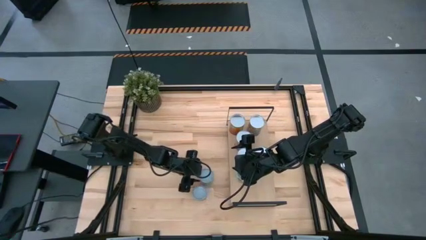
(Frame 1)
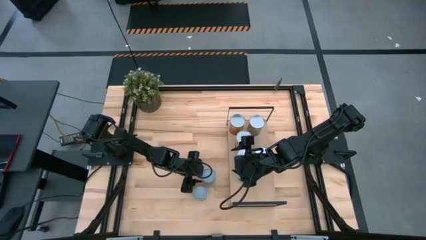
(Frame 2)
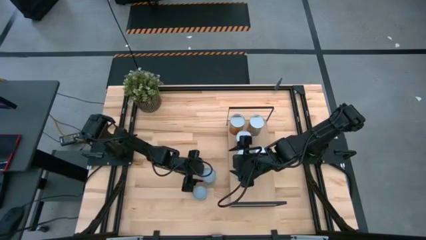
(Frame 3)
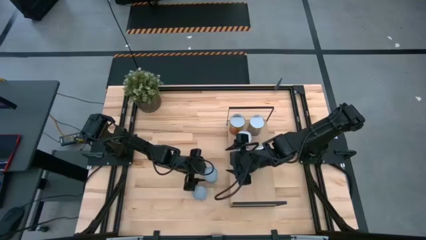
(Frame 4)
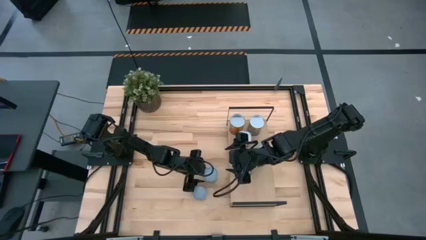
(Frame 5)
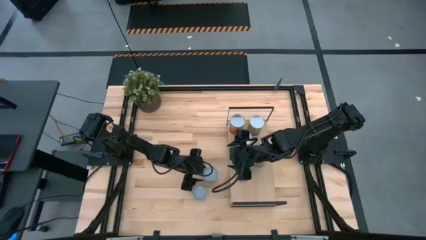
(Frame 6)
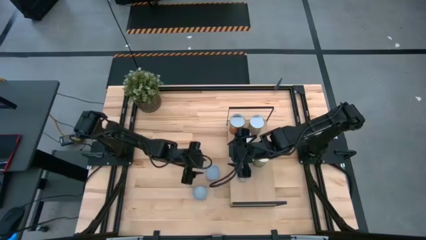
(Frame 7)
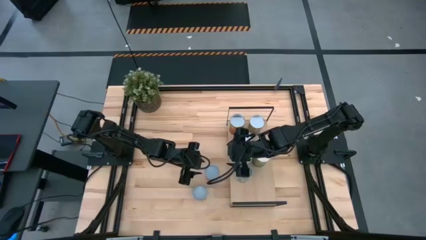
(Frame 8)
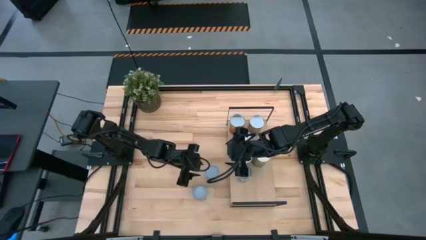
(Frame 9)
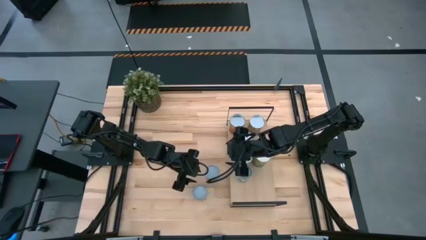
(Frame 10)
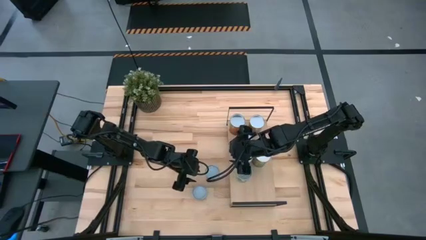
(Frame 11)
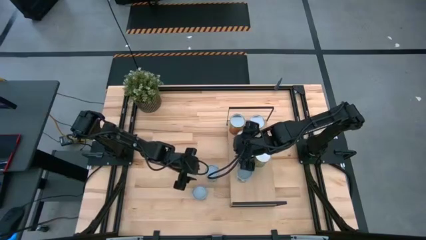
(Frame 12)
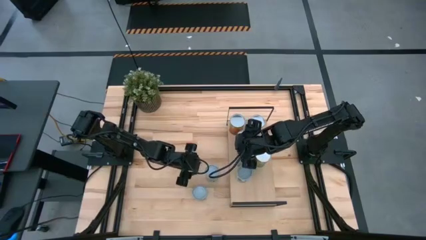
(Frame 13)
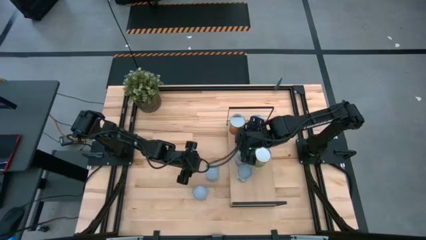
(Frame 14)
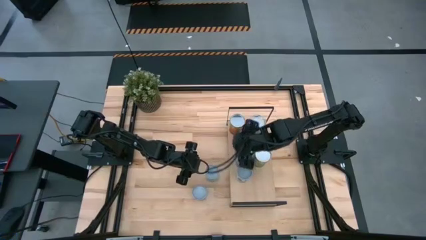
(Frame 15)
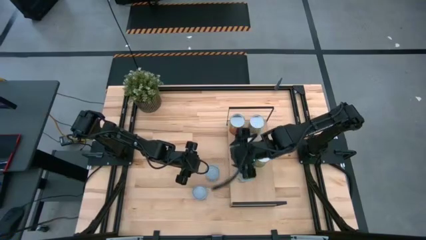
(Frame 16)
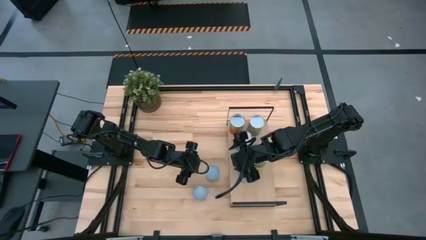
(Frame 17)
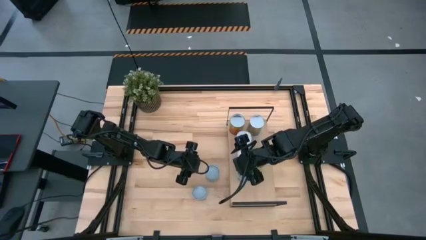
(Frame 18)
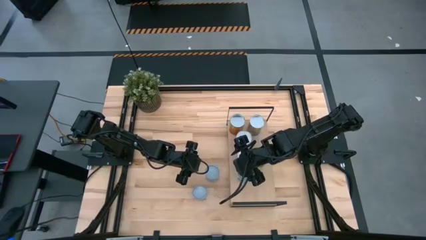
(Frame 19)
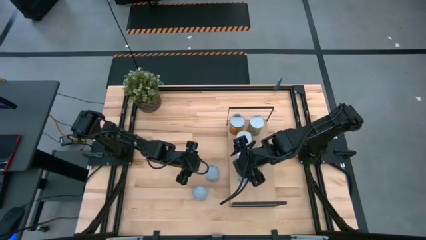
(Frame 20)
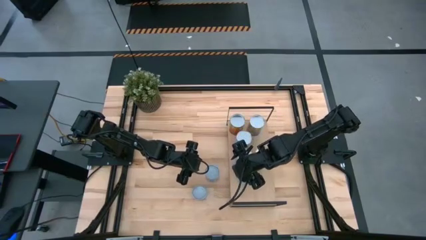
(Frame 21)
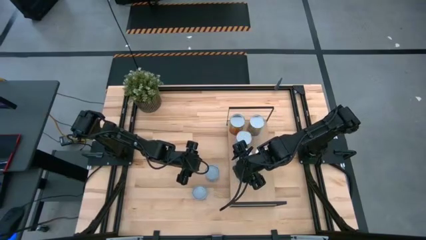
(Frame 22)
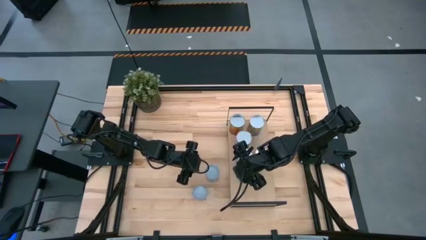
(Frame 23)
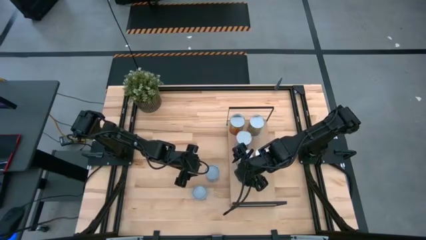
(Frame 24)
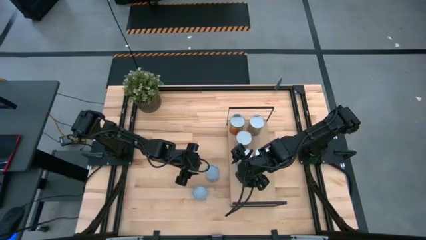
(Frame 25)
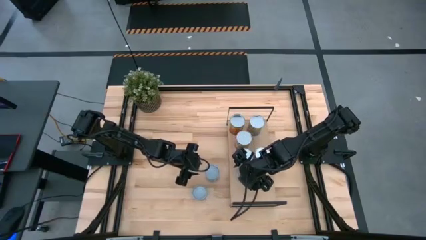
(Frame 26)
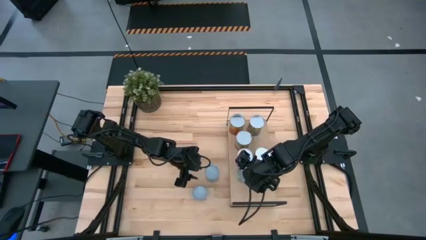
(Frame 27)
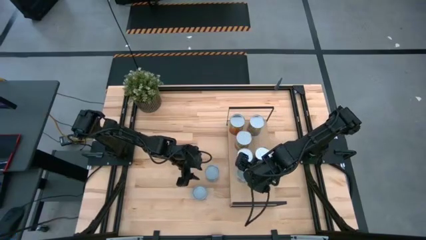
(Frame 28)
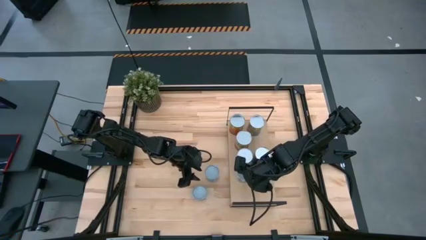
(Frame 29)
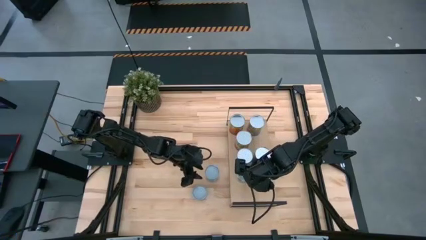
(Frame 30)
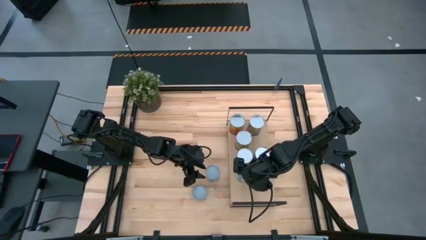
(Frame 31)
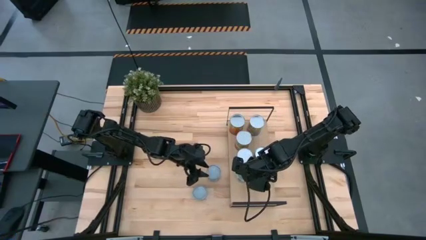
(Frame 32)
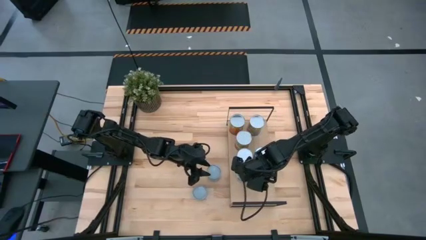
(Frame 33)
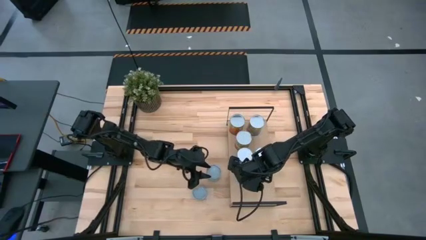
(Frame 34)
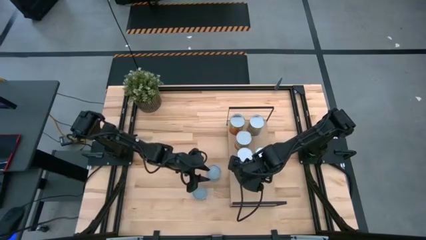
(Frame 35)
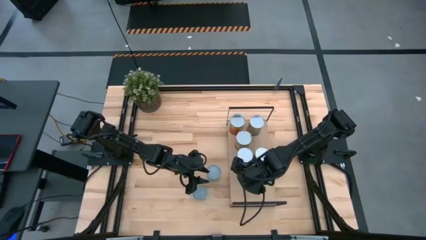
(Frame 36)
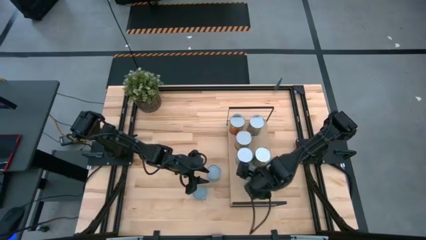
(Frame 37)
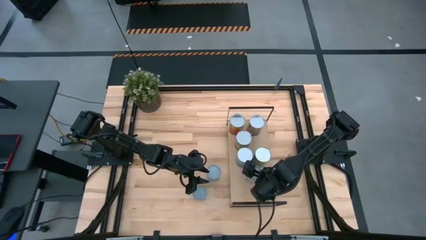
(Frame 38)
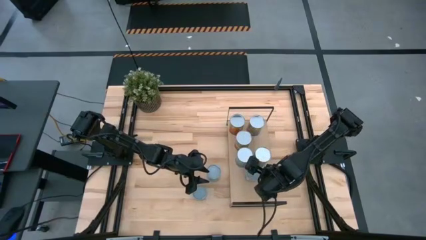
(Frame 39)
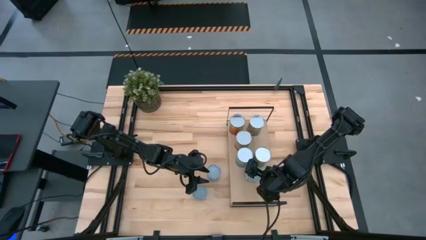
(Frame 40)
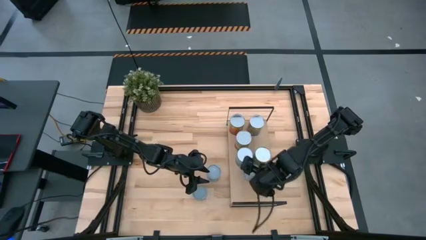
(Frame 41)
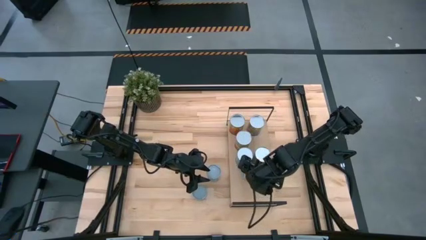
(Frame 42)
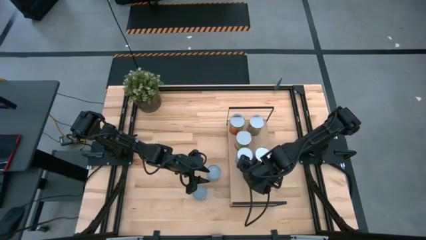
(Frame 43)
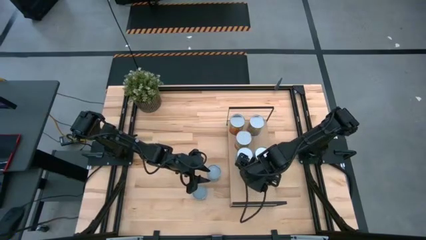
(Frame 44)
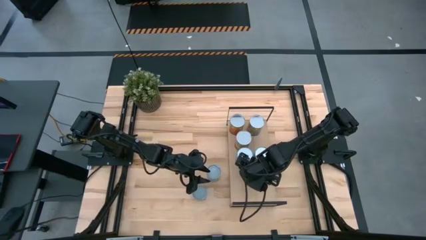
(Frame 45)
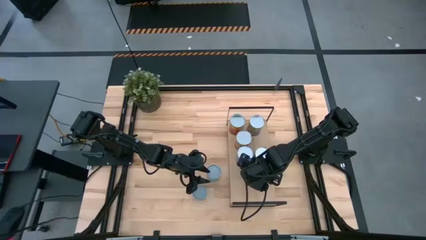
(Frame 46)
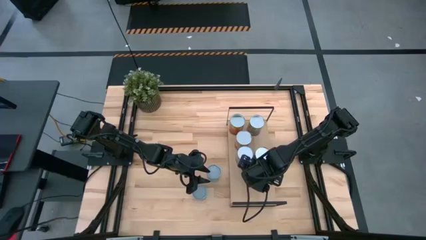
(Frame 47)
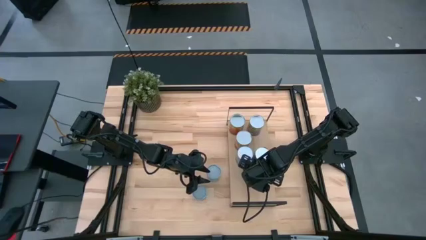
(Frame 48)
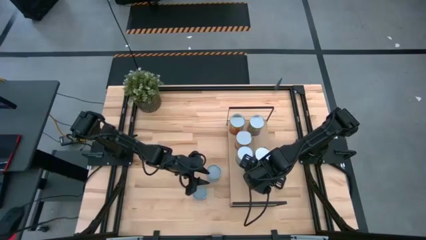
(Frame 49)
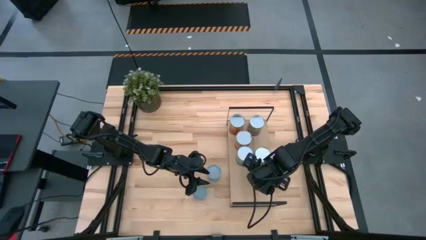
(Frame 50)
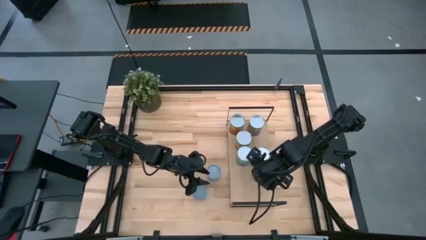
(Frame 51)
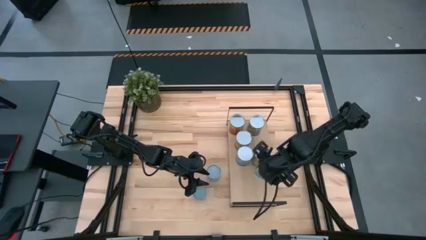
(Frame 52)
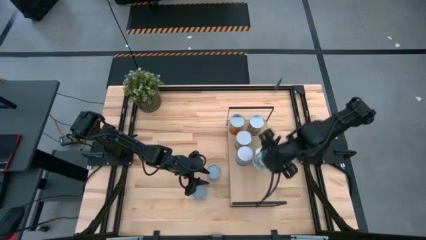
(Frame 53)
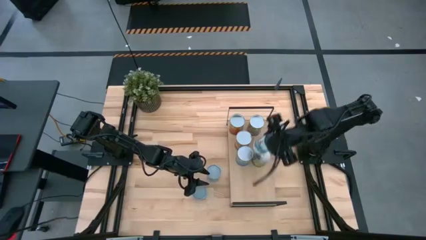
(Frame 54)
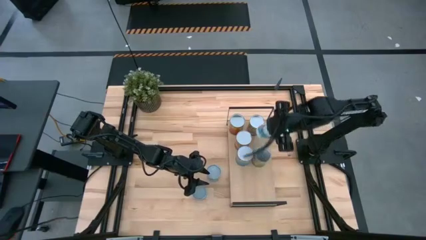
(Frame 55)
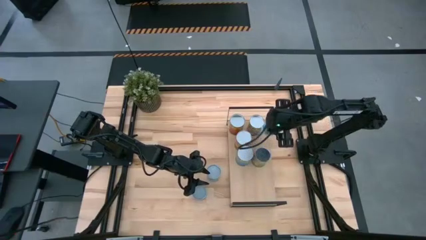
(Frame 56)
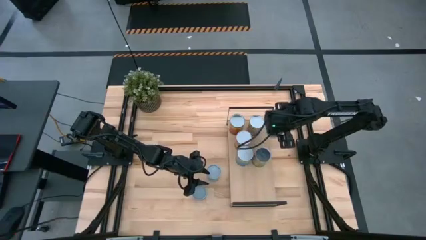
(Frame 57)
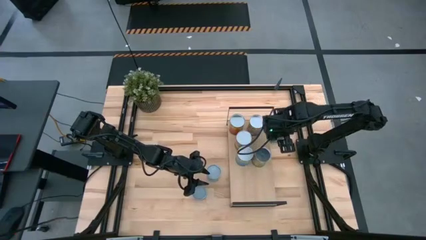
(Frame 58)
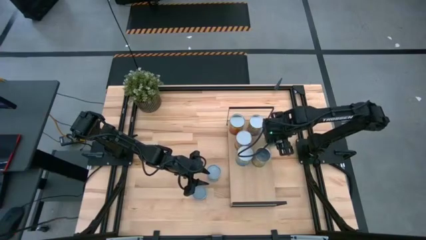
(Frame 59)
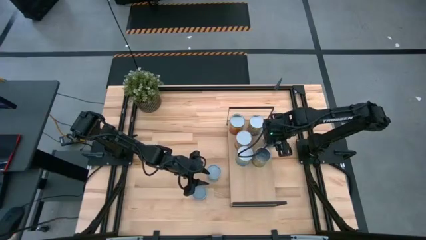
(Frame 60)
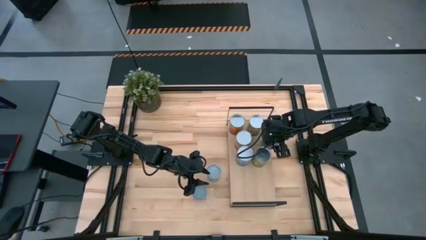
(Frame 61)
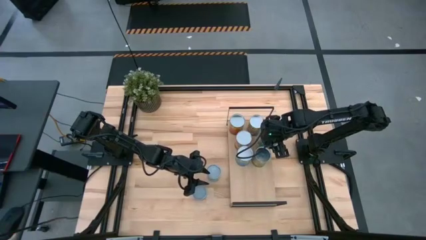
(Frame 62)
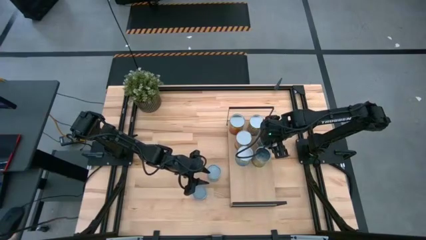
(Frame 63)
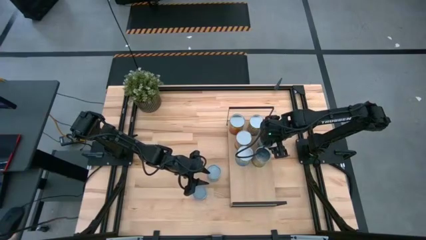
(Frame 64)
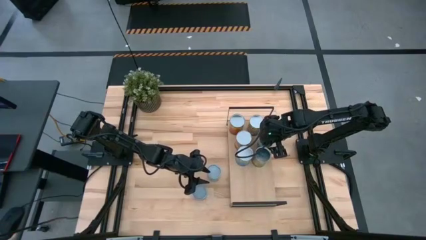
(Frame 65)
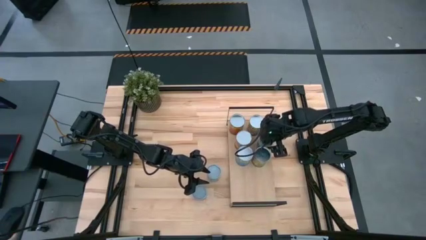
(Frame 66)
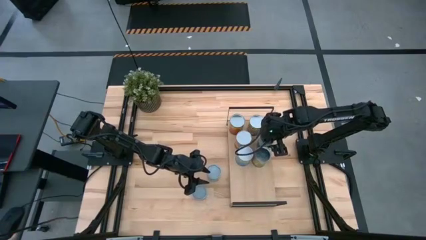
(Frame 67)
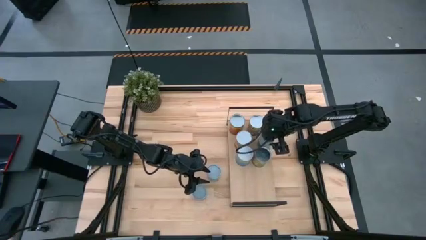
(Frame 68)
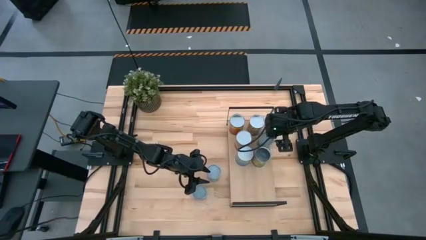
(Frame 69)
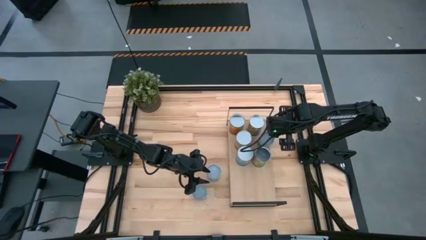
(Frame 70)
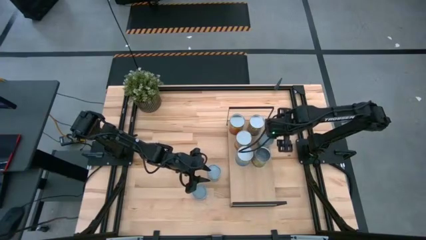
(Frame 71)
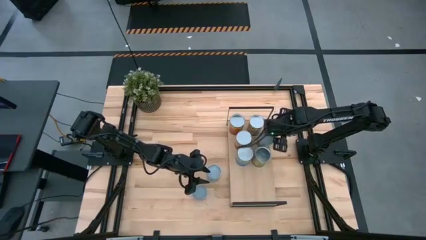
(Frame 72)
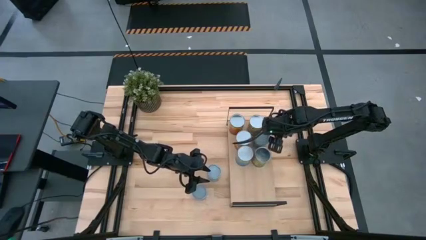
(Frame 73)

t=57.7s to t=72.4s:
Task: Pick and place cans onto a shelf
Move the canned mixed vegetables in between the canned corn and canned oranges on the shelf

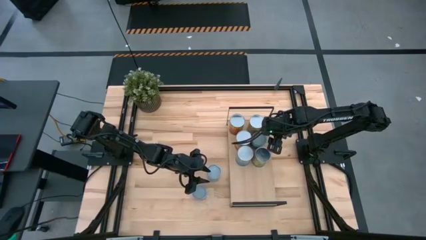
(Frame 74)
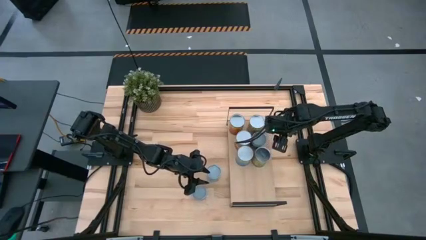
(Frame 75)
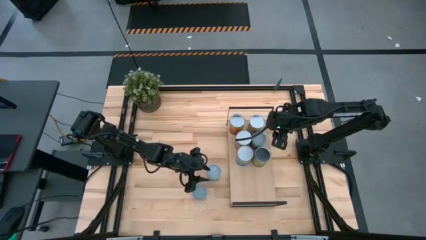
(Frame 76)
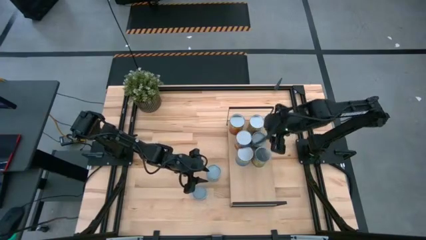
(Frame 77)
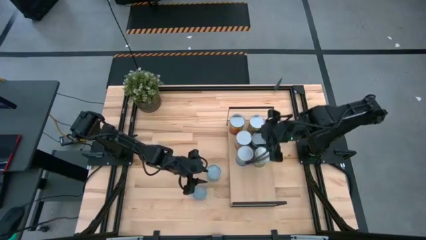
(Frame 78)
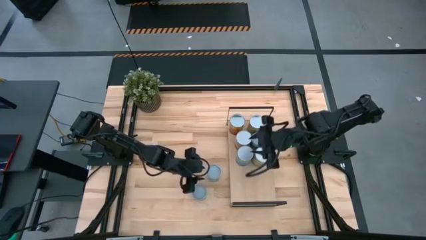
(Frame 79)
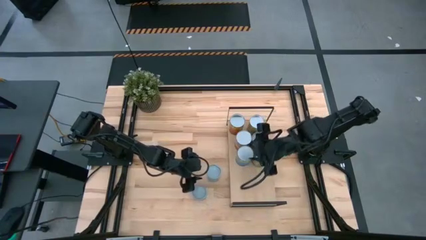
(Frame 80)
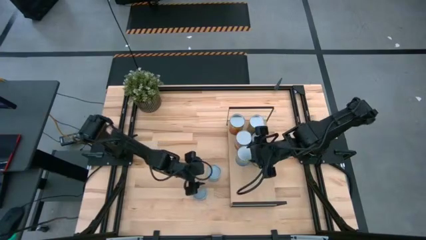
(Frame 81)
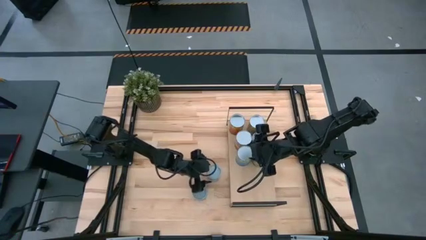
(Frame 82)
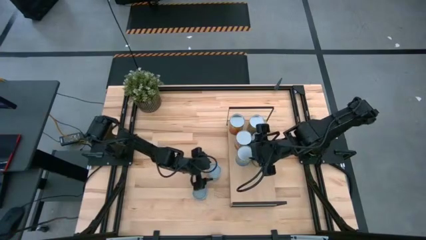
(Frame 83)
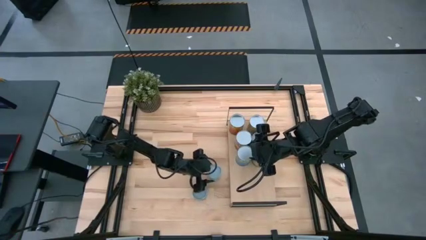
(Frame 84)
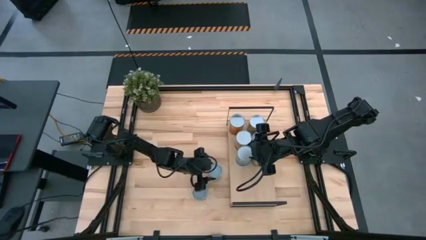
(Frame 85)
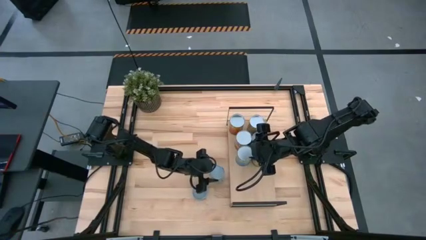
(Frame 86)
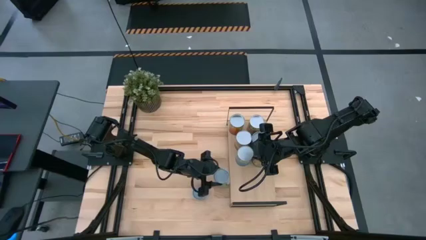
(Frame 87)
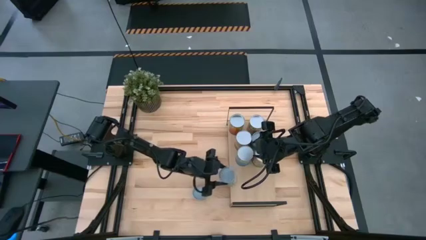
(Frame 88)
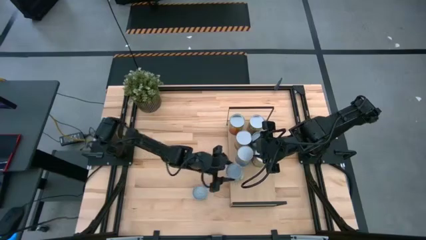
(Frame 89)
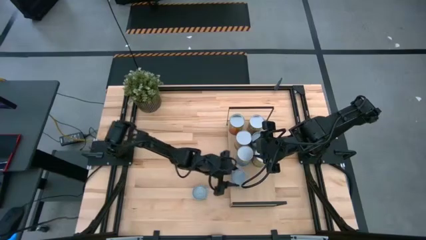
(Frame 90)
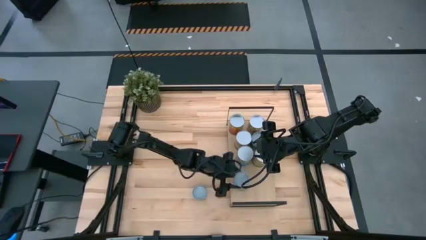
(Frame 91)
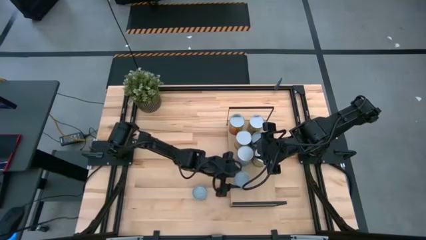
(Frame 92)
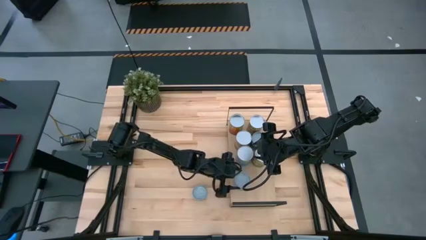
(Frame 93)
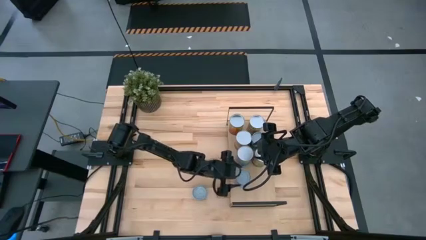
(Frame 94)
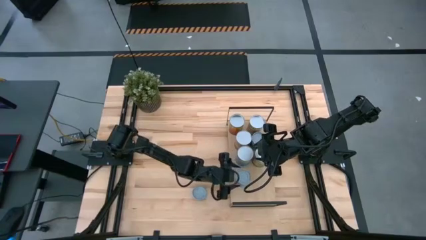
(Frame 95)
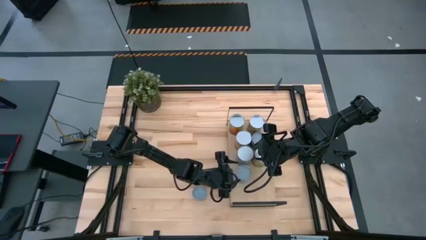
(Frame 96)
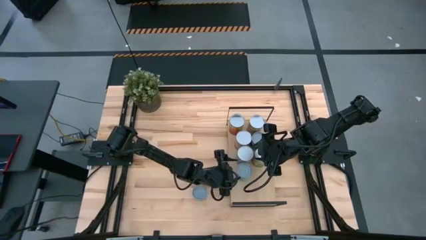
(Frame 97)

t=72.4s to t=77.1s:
Put the canned chicken soup on the shelf
